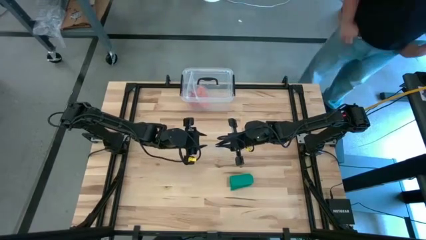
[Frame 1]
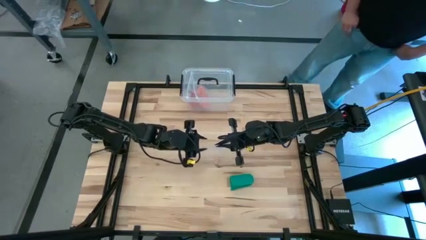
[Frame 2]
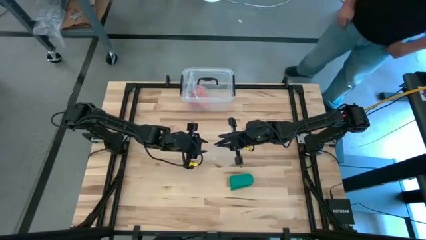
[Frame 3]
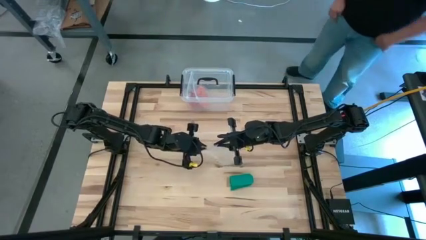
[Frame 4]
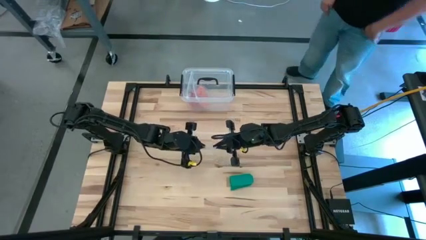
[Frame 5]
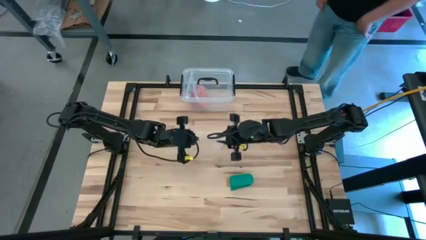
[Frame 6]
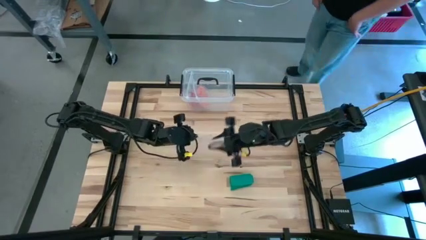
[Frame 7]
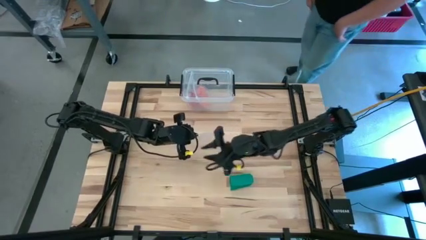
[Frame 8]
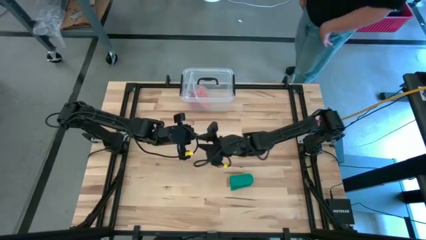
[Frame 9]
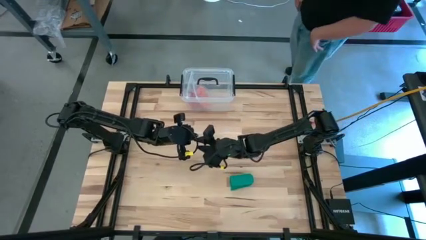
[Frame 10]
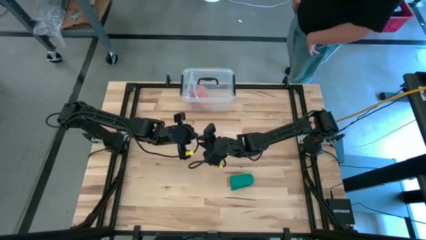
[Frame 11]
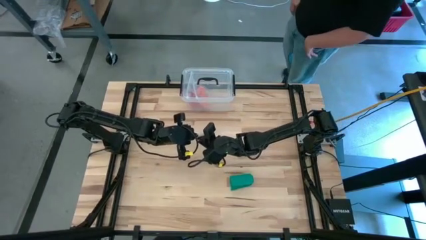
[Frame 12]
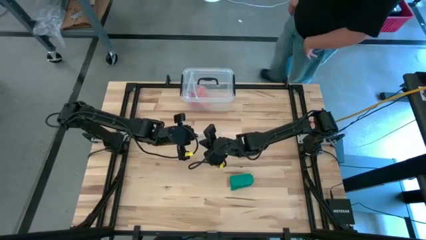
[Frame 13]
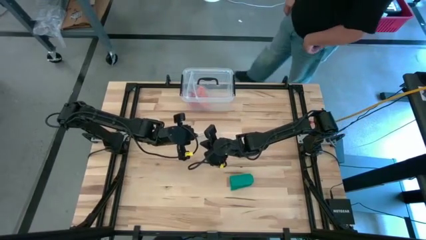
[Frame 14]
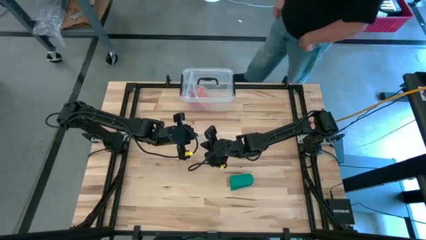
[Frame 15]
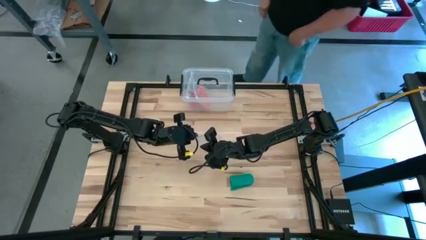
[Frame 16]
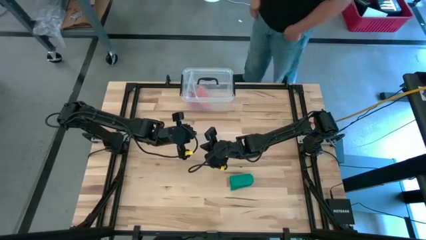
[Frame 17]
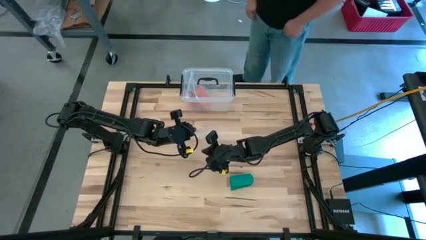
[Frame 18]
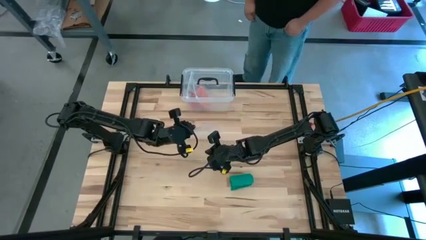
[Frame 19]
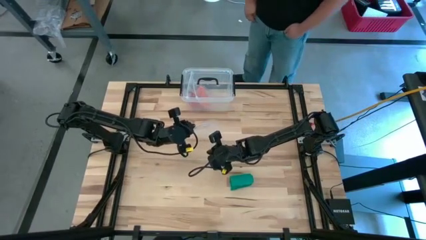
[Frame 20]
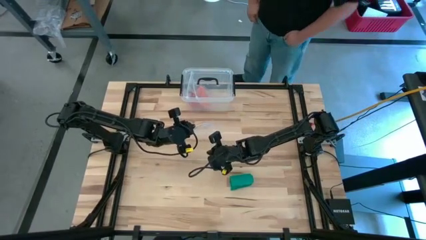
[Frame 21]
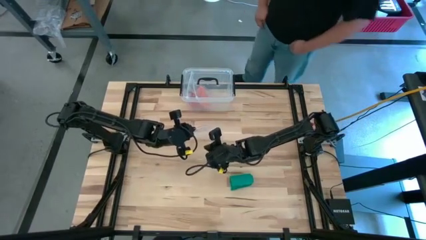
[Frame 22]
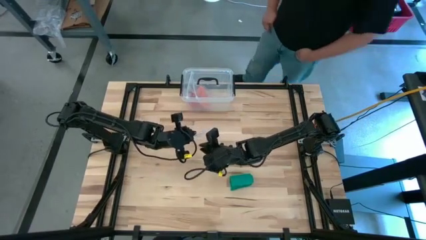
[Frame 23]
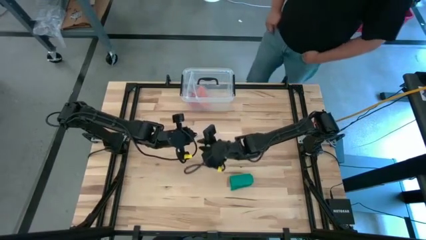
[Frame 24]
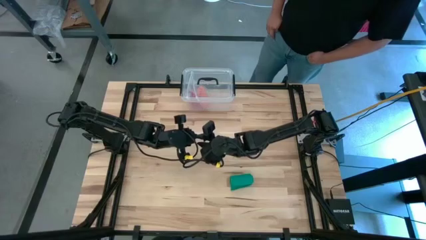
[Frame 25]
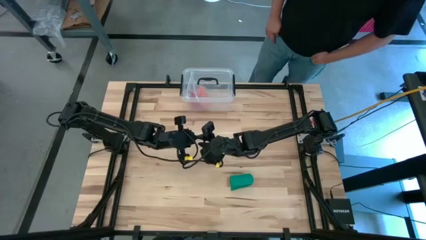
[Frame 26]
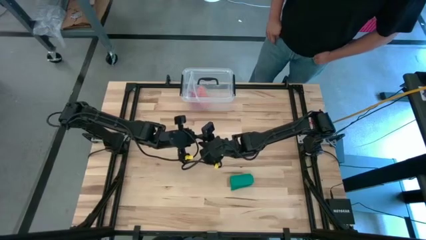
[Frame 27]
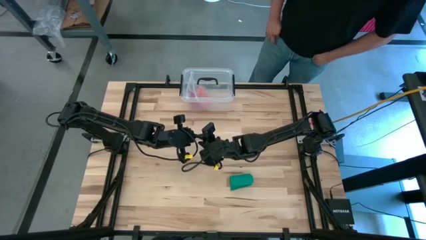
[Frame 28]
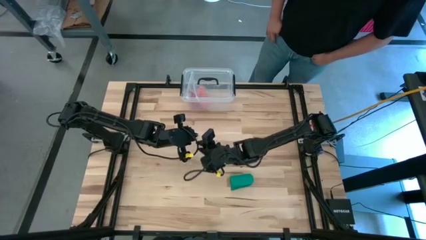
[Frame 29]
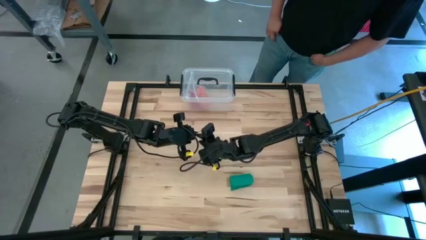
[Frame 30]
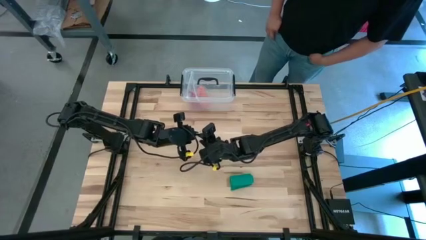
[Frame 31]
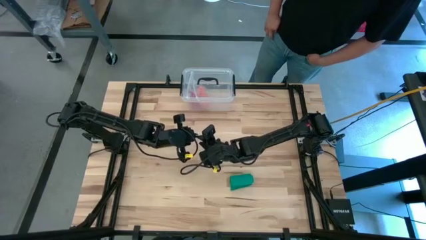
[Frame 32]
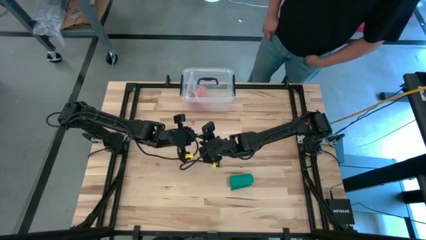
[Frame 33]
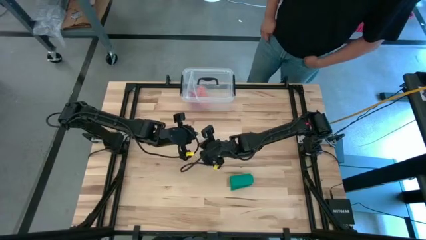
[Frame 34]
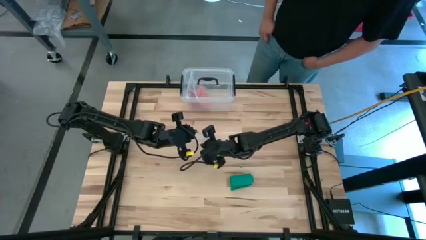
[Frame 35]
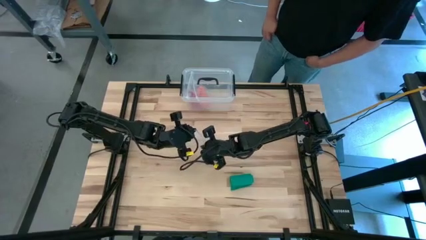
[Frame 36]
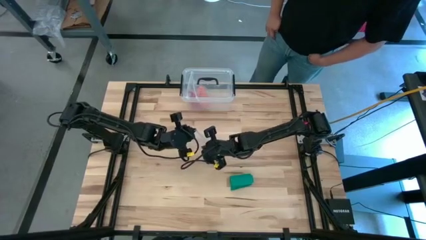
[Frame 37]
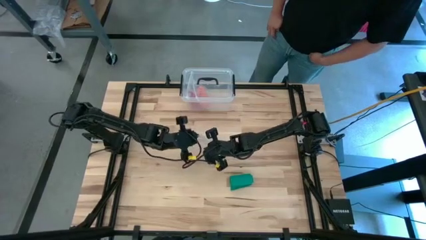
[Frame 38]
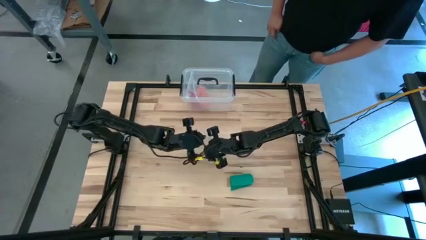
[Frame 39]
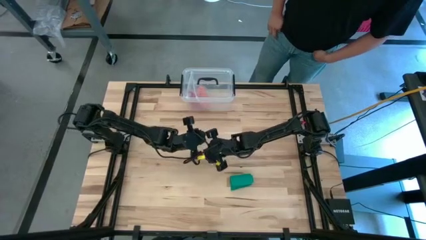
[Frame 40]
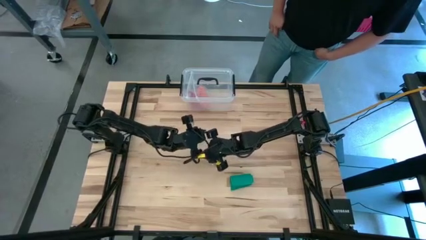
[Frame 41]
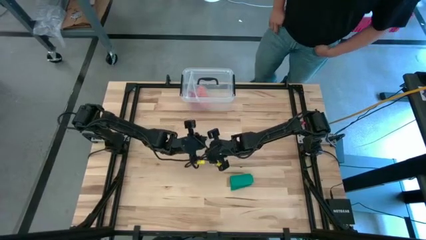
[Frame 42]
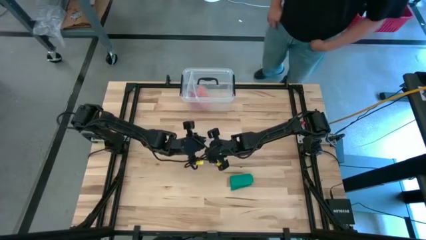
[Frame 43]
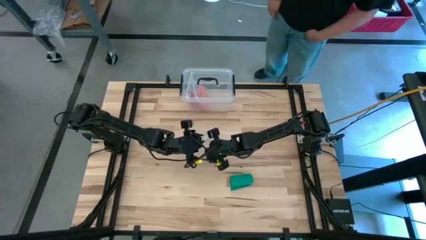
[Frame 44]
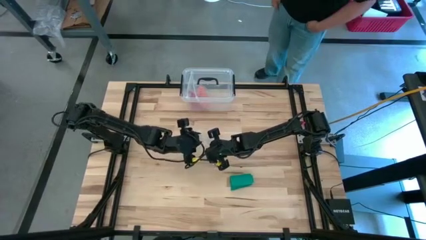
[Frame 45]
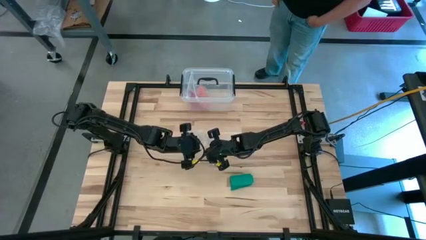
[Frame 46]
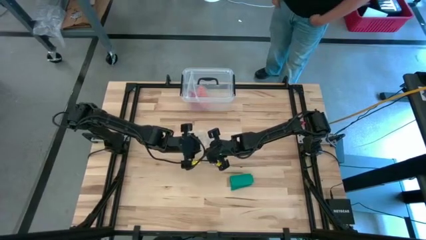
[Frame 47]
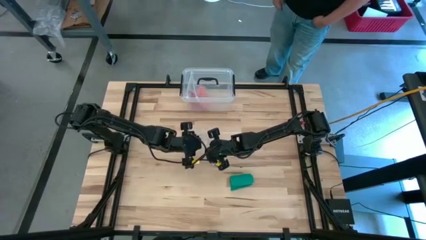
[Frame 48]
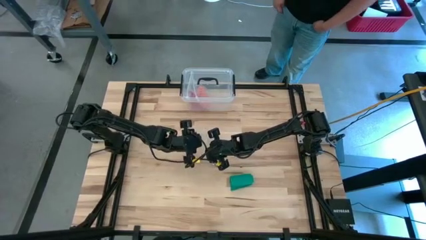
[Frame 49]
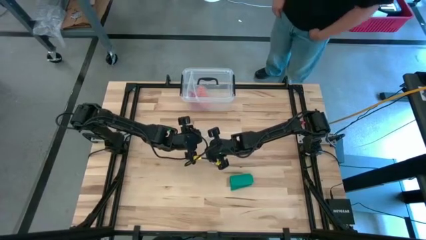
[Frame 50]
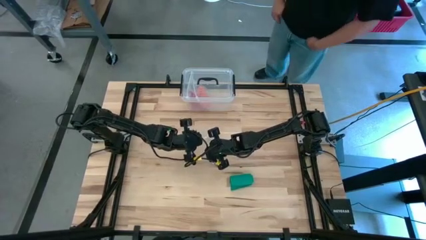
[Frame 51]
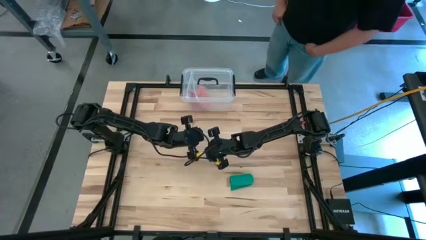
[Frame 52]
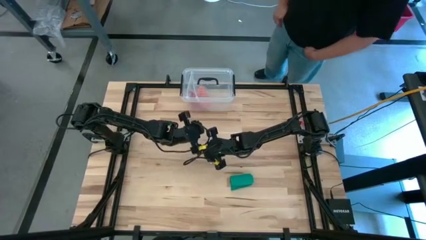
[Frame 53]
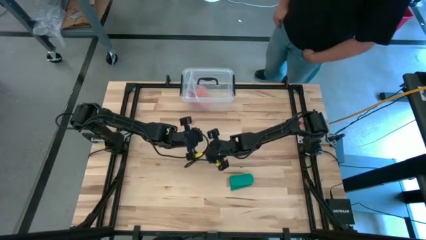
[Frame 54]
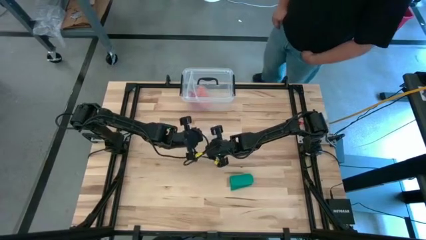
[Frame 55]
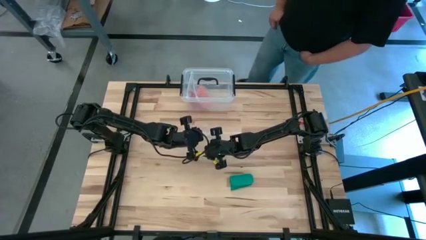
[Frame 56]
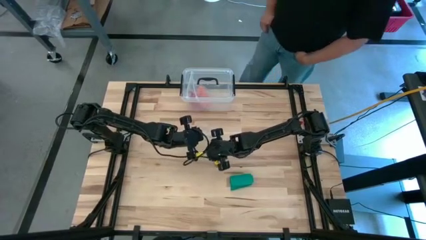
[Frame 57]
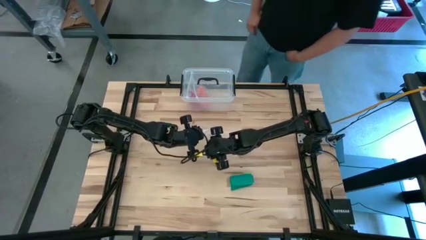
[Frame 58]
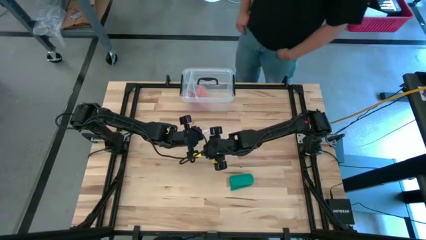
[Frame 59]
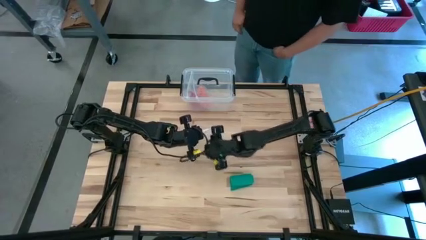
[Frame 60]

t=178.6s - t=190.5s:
Task: Roll bandage
Open the transparent zip bag
